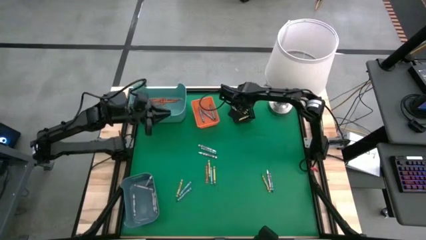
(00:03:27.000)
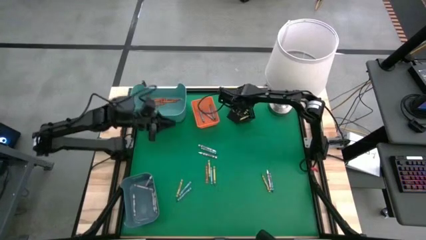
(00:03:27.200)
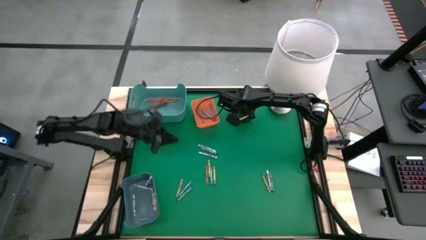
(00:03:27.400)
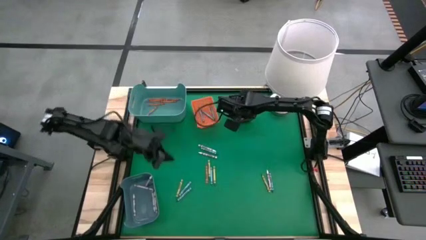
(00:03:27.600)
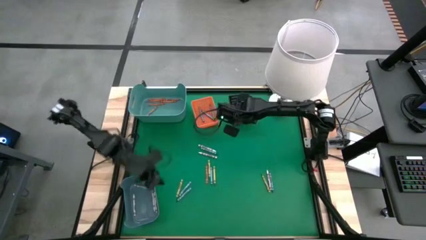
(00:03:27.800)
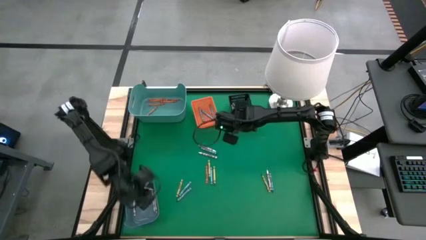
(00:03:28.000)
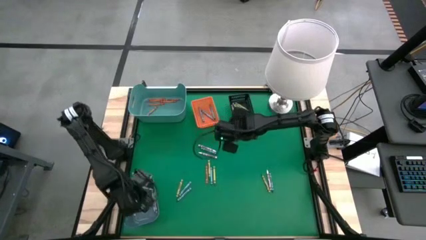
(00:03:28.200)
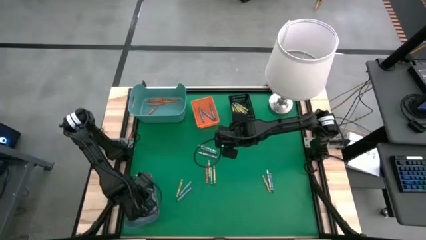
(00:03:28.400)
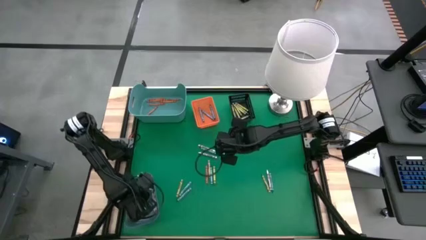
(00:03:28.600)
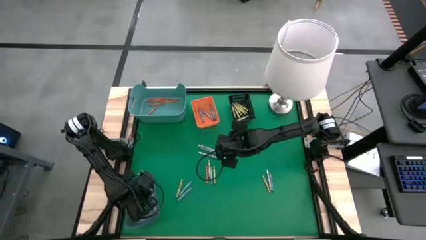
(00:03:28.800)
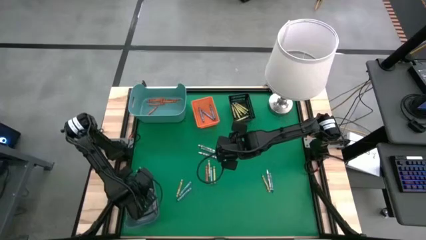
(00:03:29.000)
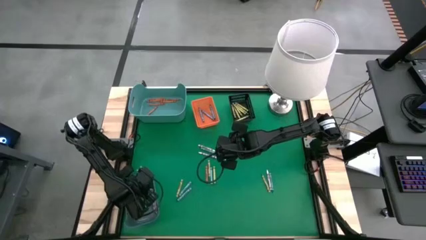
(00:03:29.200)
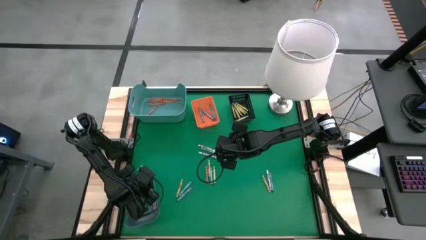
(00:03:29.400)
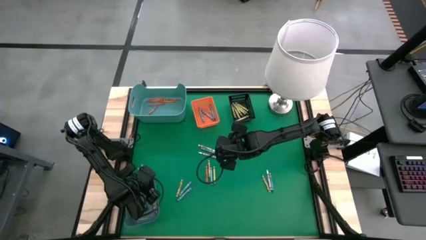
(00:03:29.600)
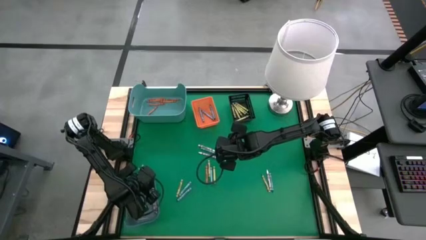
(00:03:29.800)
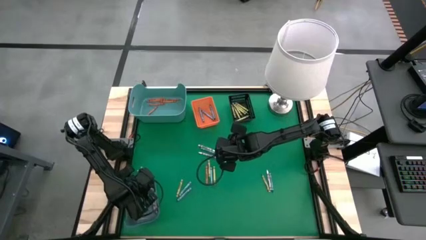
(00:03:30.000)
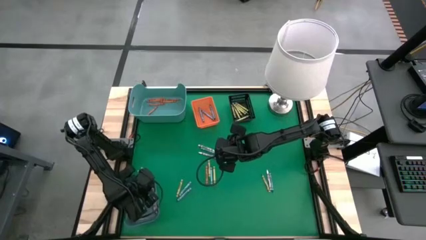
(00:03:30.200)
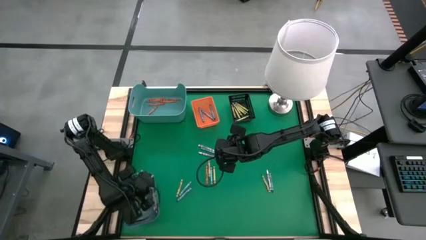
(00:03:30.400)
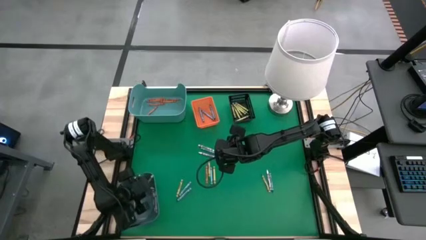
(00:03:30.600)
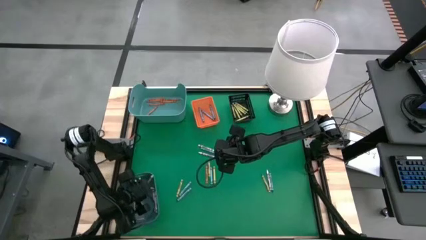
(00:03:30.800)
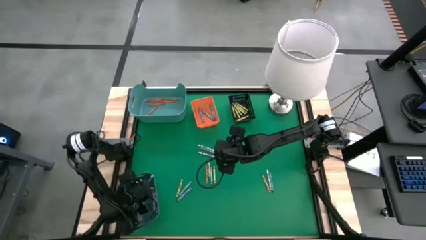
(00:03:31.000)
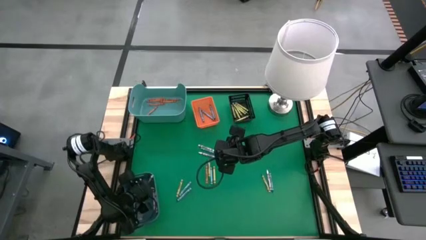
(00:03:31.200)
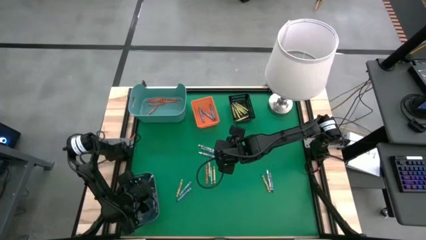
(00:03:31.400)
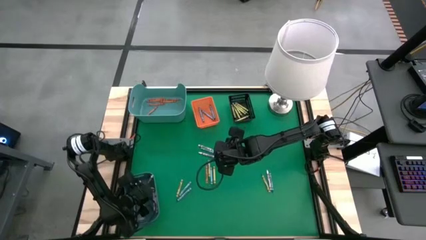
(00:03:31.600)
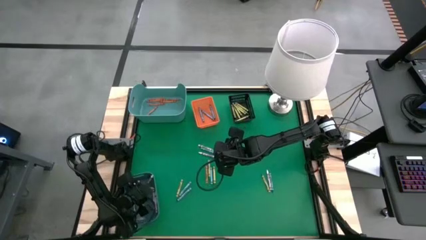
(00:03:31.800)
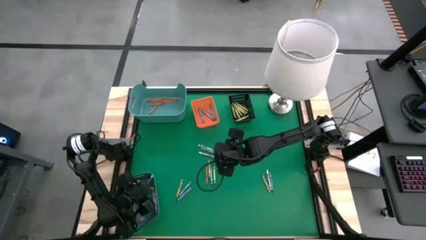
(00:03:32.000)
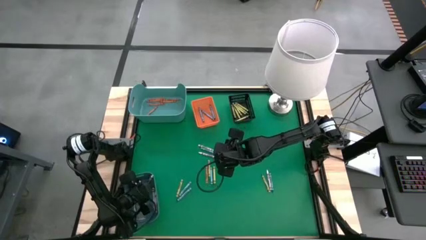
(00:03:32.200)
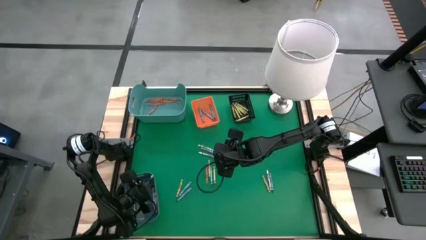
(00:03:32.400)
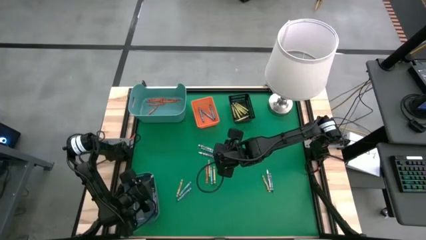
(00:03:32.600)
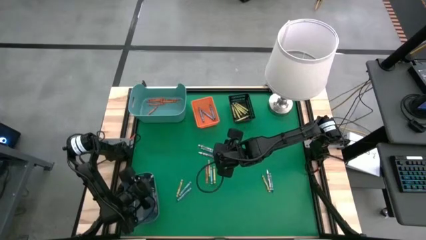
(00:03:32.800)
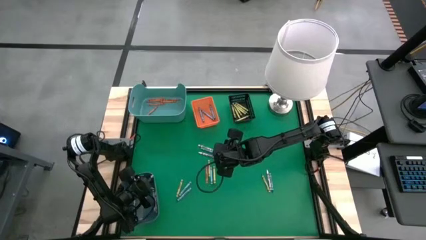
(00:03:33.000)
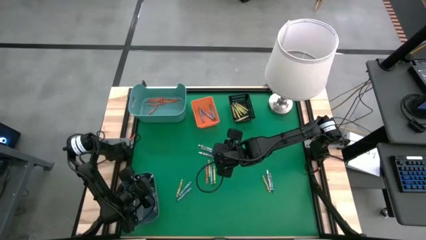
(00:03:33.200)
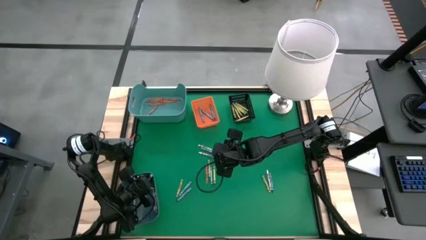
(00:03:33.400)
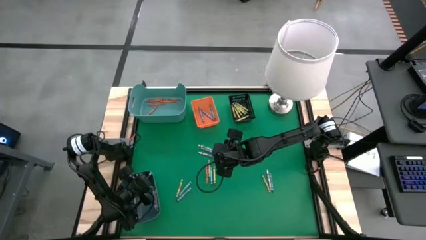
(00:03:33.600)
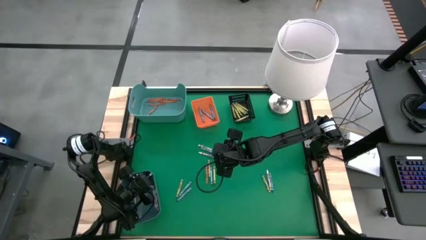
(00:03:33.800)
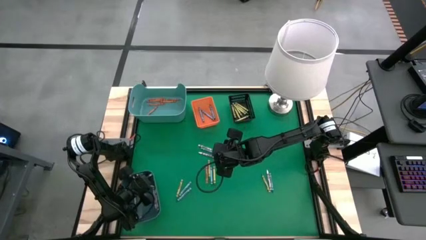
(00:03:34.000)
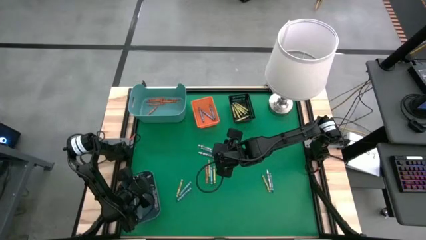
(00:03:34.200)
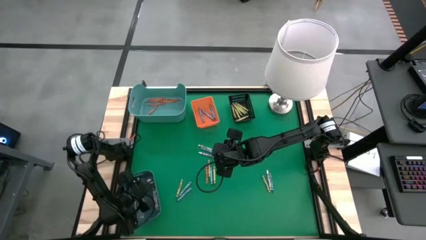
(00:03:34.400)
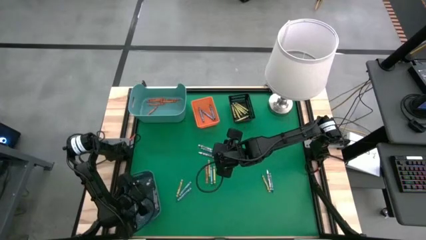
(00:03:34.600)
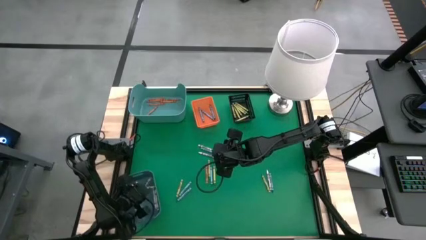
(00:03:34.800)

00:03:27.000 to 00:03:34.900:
Task: Sort crayons
Adjust the white crayon in the blue bin

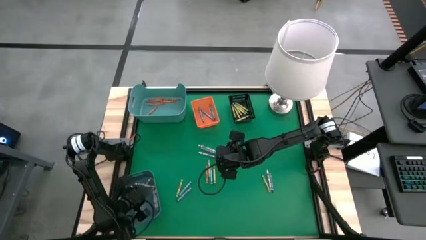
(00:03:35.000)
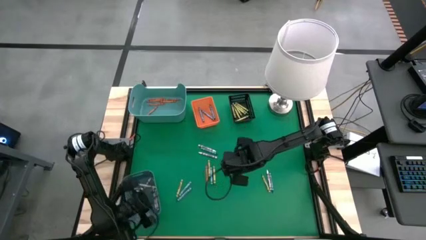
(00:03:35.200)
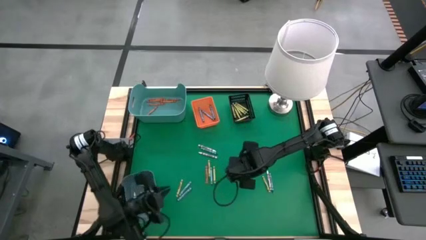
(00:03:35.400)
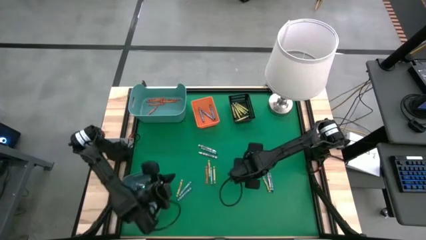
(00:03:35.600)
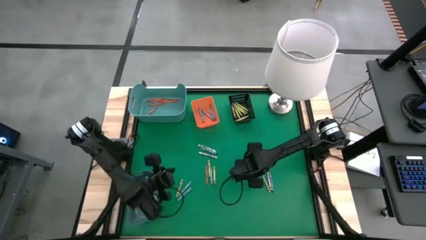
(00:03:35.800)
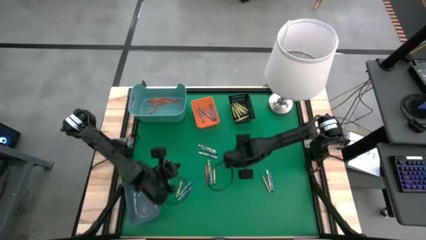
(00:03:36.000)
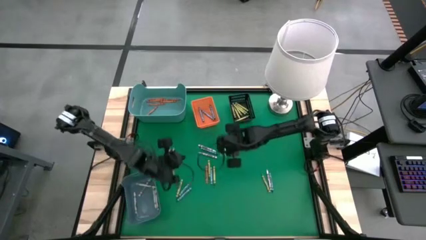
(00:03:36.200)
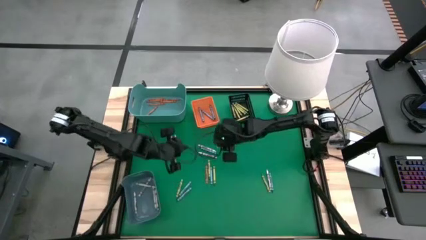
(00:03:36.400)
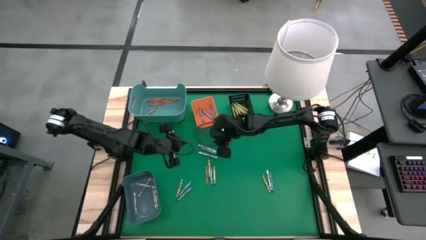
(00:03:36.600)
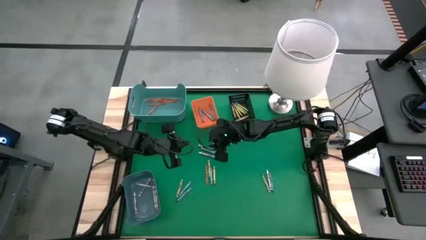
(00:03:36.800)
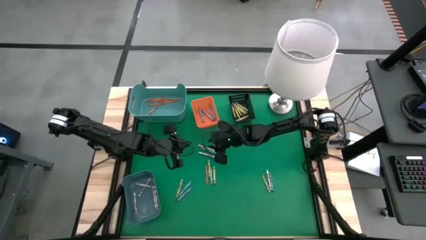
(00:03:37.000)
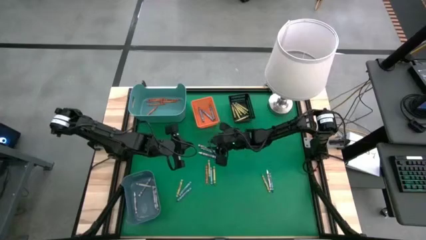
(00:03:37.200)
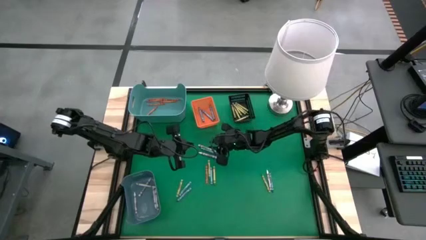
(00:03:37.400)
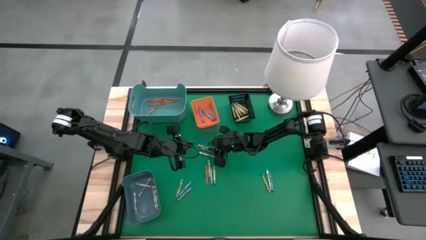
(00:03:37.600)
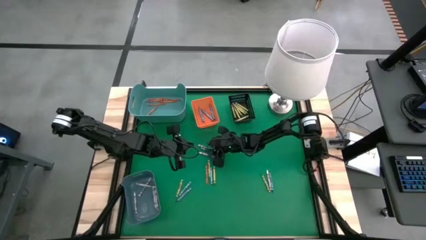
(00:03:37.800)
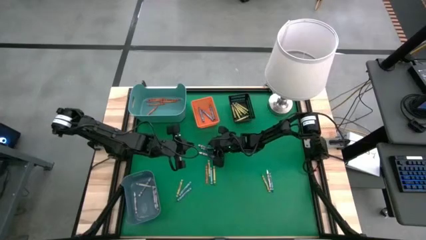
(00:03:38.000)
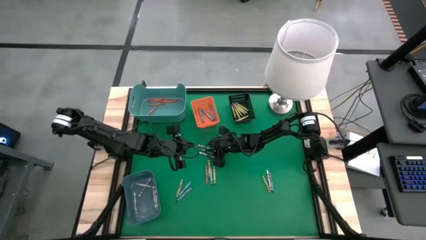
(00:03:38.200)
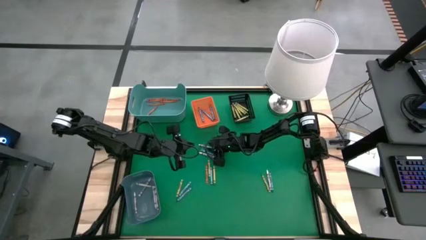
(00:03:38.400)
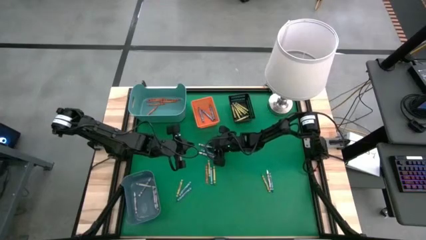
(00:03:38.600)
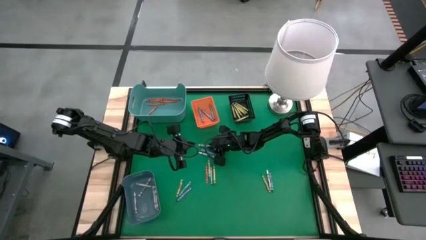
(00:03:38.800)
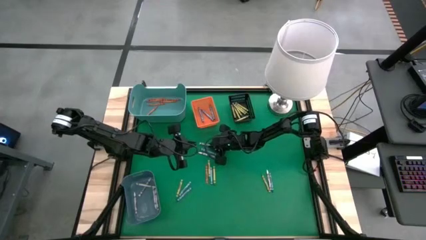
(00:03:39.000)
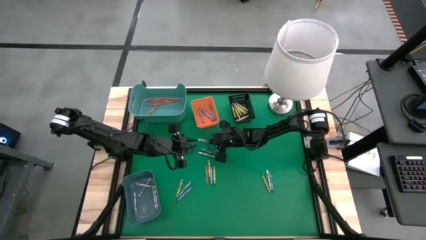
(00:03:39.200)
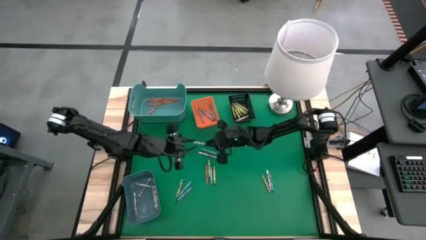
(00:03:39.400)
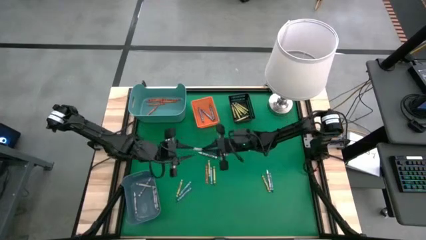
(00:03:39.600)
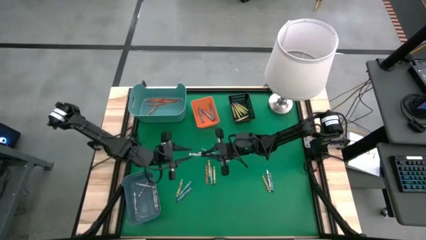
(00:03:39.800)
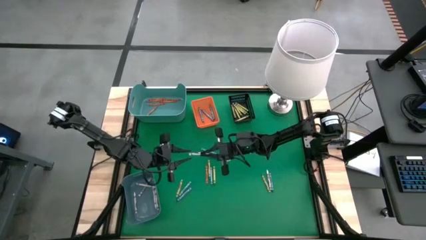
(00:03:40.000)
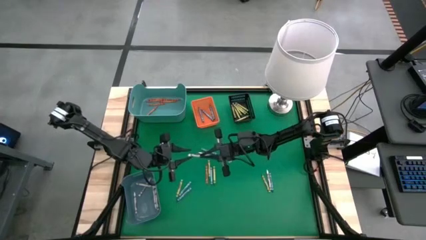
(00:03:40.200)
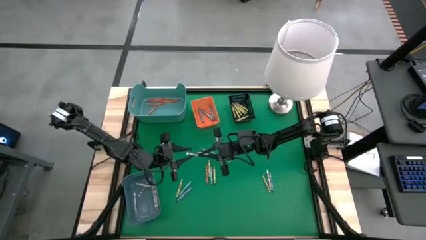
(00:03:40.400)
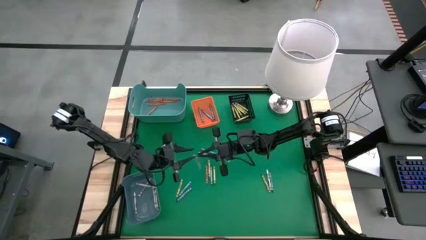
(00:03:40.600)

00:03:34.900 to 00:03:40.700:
Put the white crayon into the blue bin
